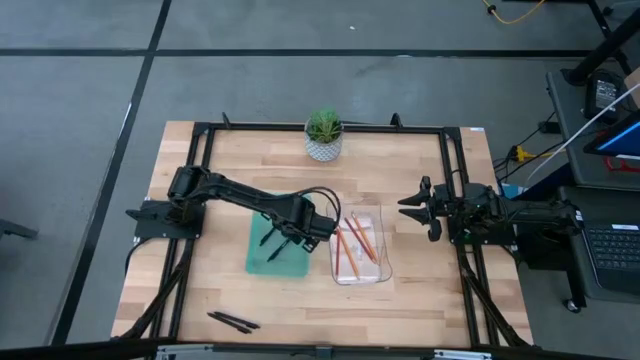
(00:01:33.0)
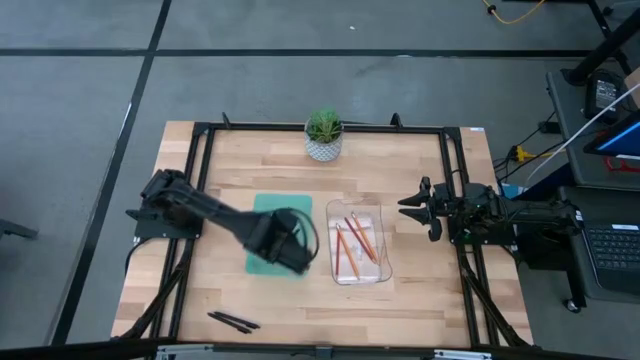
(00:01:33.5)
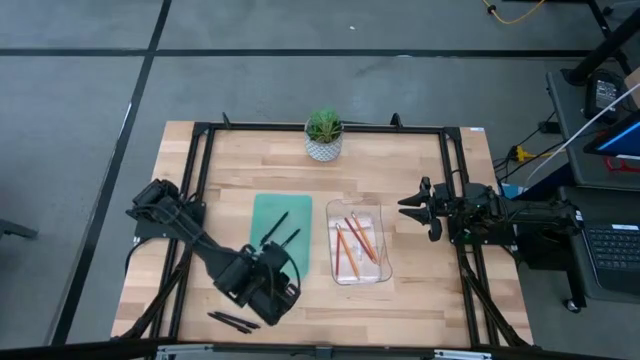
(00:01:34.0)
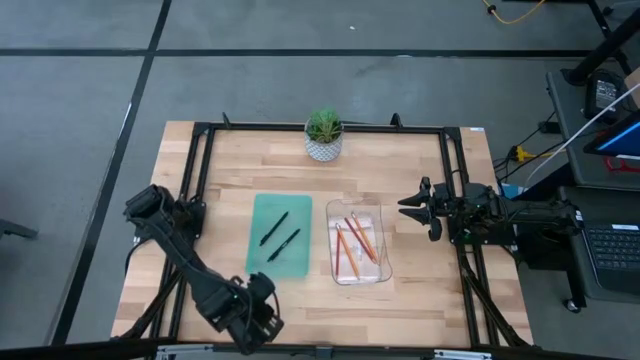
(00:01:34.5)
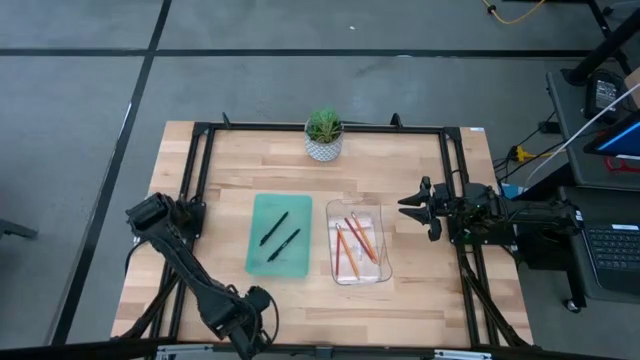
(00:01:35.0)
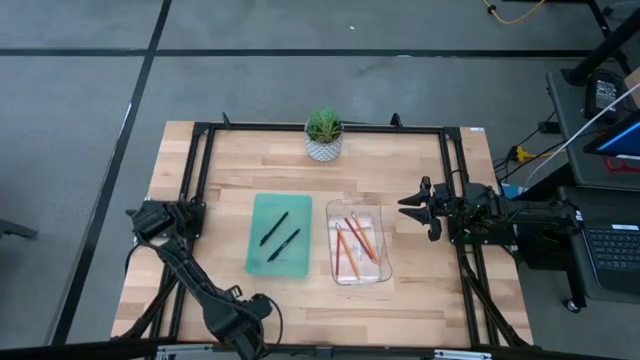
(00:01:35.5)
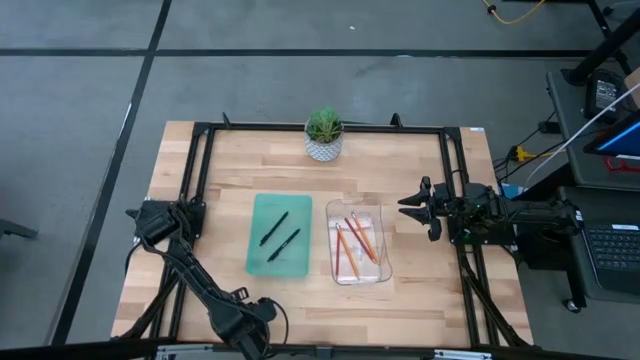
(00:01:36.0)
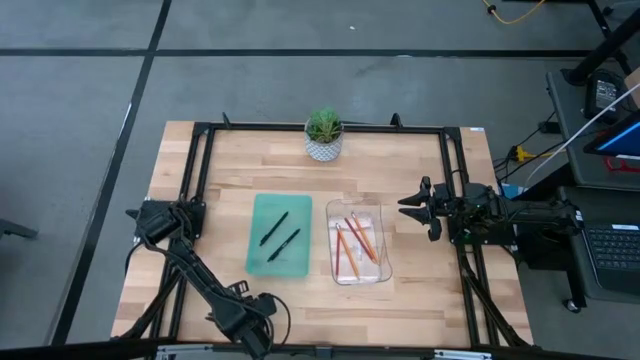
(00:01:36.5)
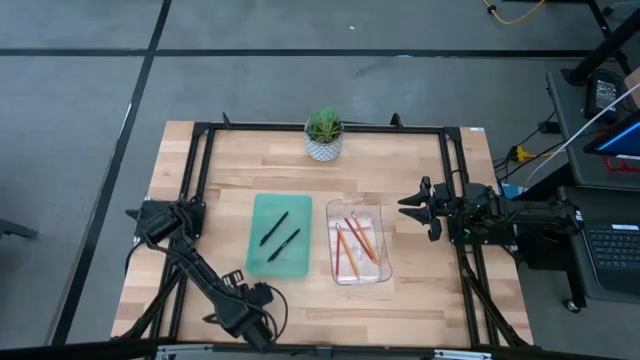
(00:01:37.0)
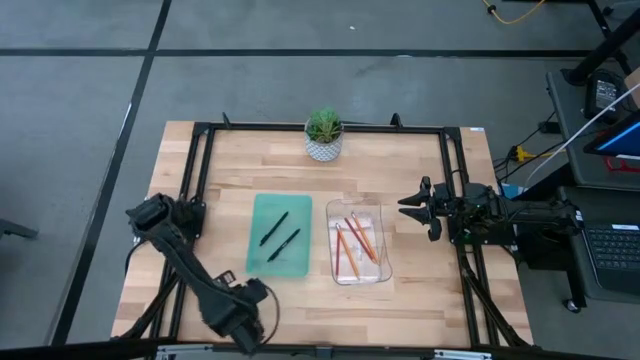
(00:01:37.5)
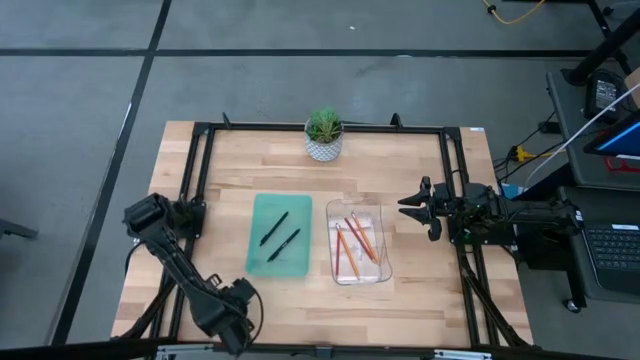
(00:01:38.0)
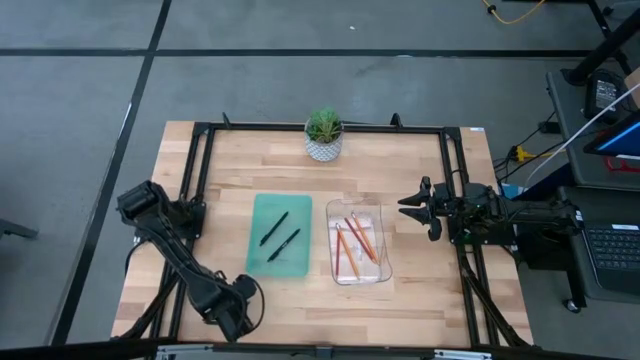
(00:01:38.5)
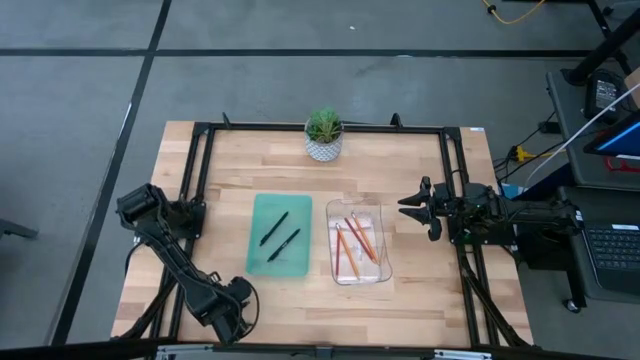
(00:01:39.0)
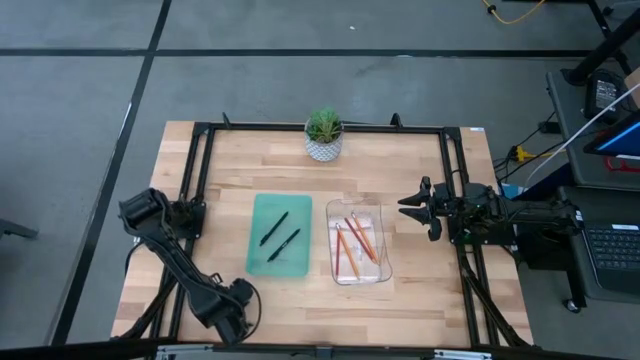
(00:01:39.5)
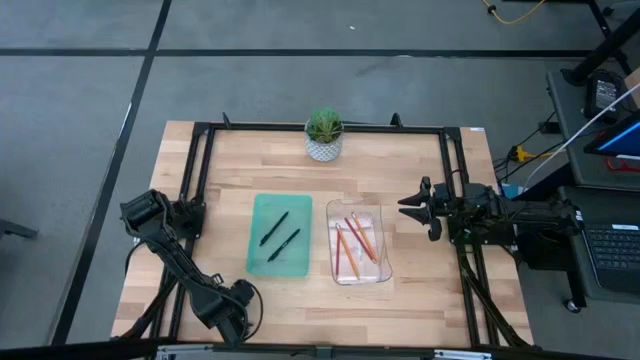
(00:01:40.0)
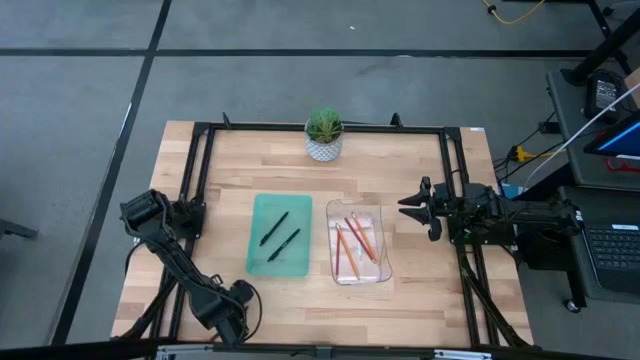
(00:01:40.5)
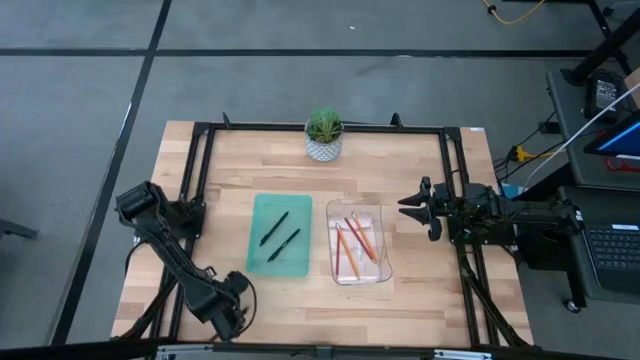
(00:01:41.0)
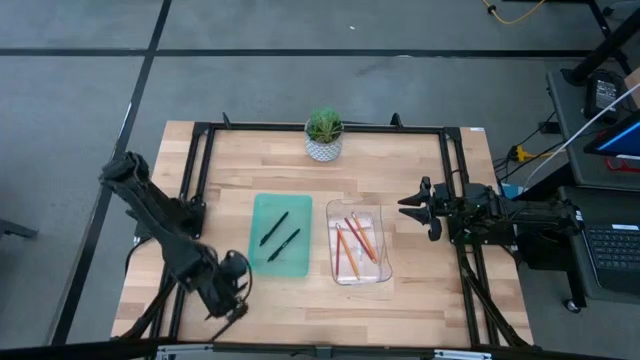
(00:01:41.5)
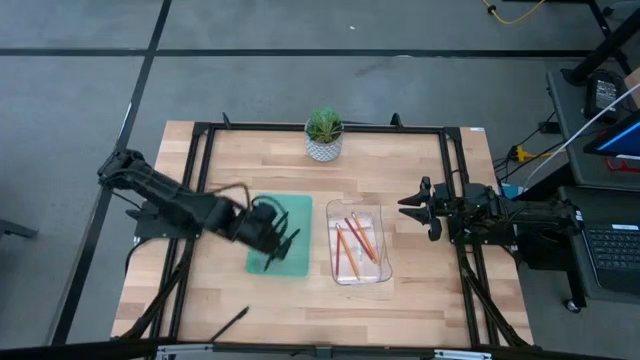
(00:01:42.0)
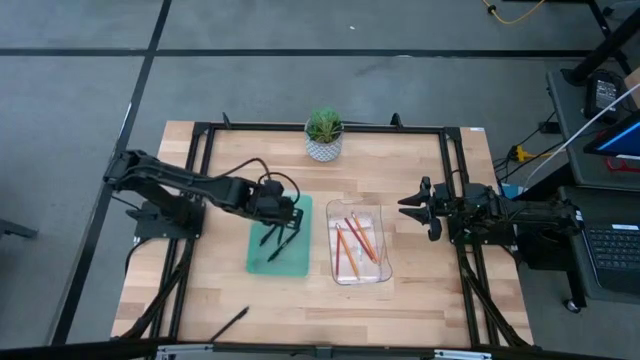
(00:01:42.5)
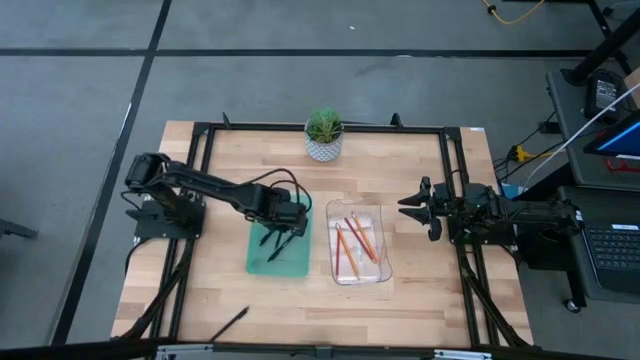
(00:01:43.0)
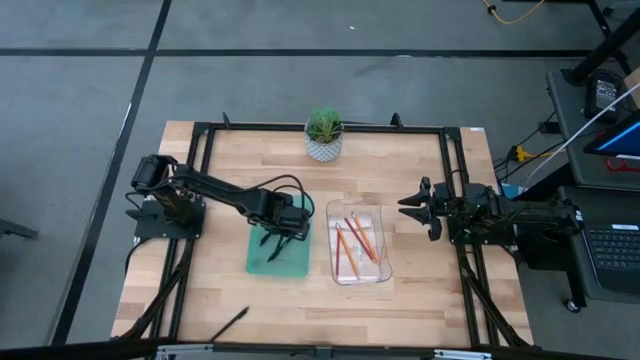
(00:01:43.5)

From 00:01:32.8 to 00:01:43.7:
Task: Sort pens & pencils
Put the black pen into the blue bin

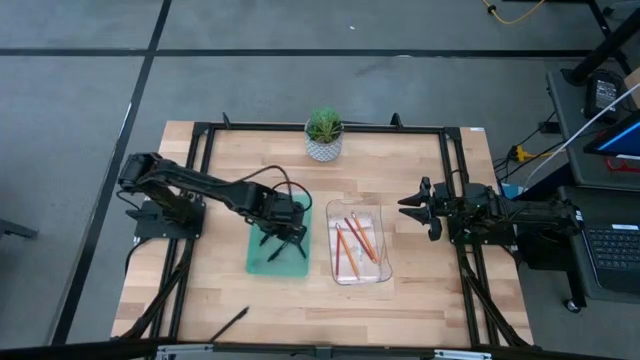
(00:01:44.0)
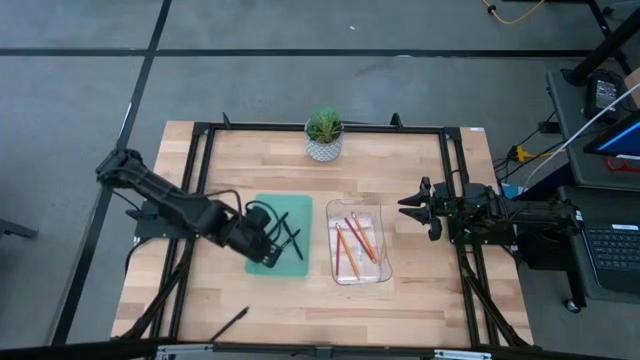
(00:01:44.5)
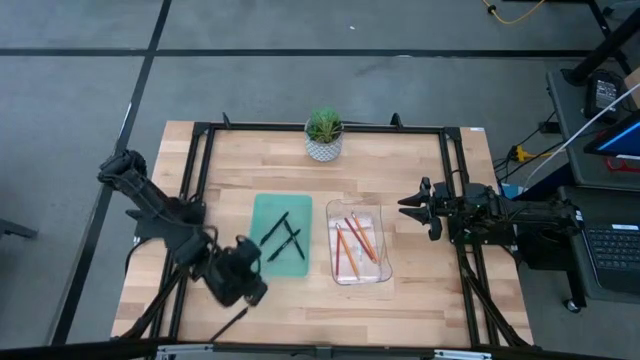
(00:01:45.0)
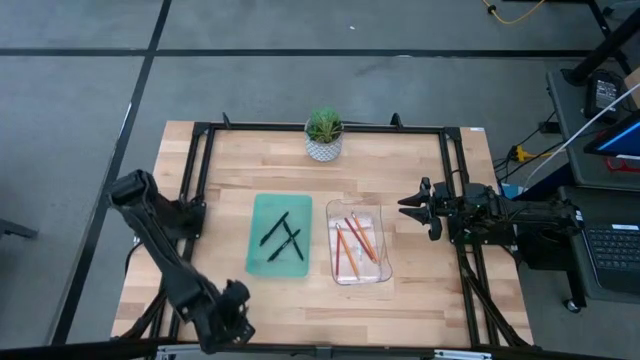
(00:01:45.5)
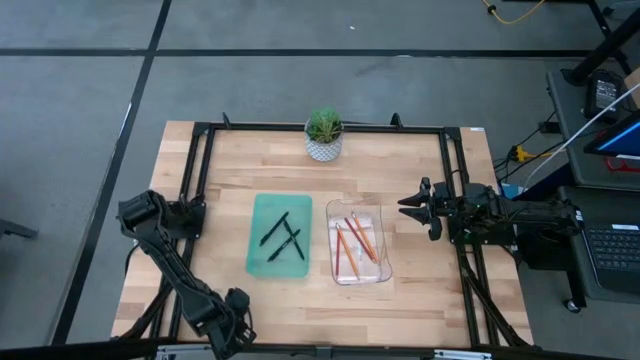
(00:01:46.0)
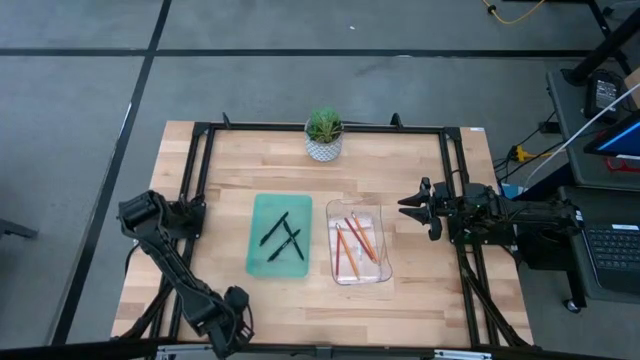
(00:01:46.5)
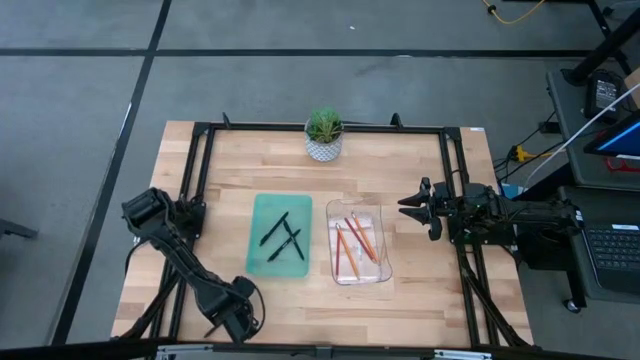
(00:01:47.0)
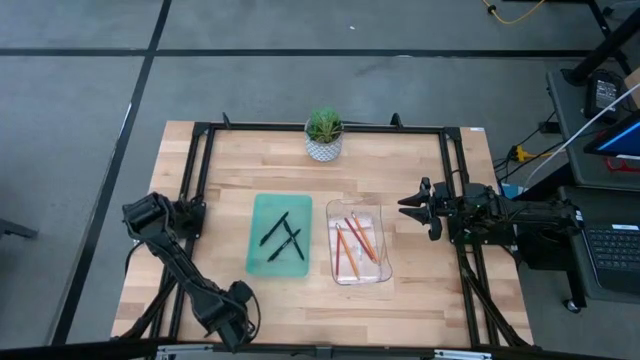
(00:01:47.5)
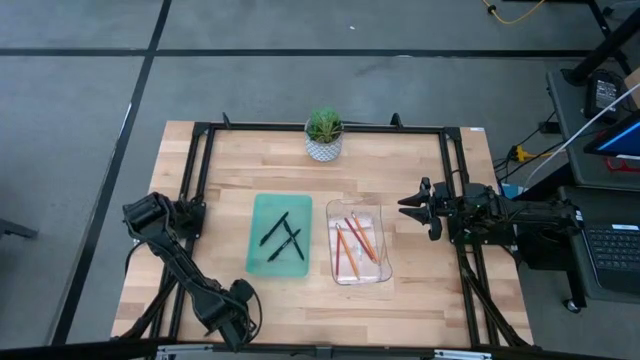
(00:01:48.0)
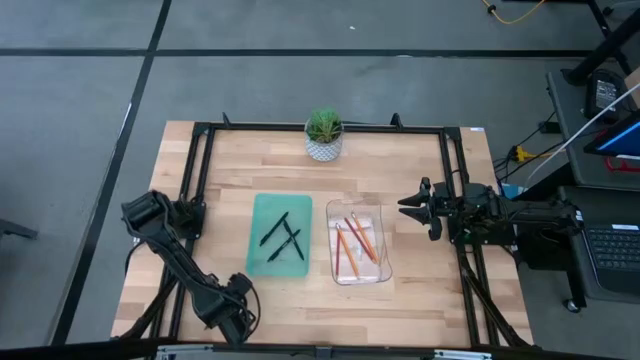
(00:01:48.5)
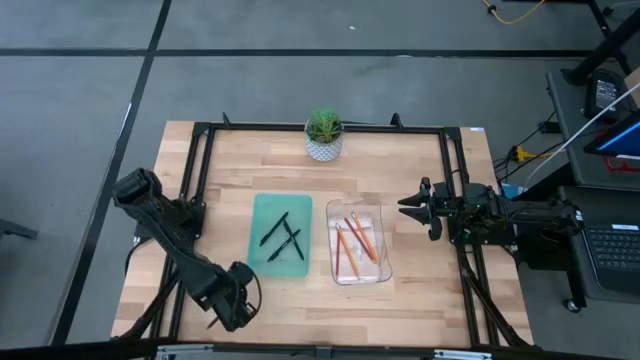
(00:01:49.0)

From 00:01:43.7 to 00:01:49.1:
Put the black pen into the blue bin

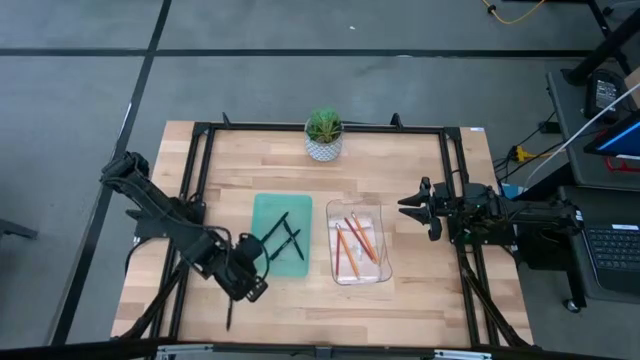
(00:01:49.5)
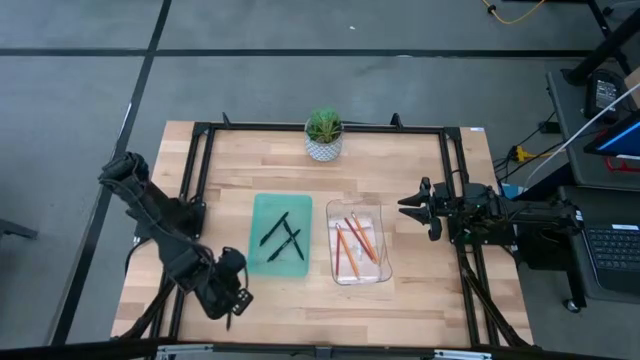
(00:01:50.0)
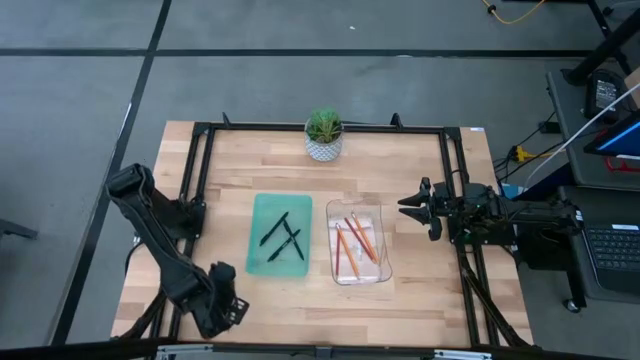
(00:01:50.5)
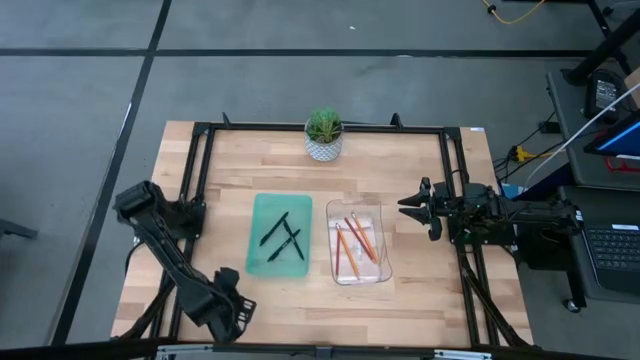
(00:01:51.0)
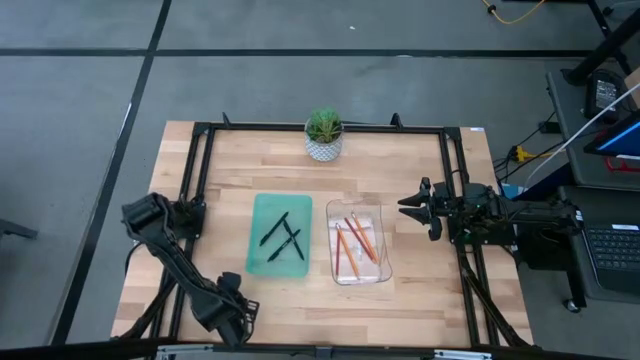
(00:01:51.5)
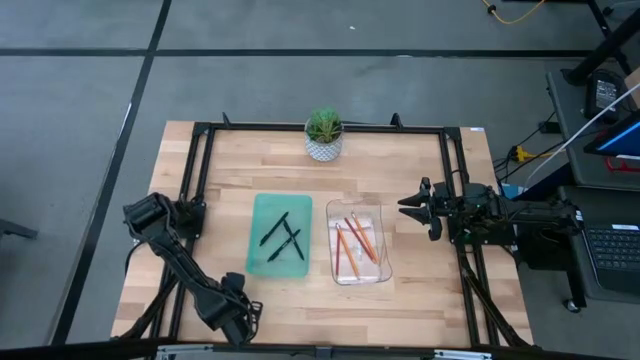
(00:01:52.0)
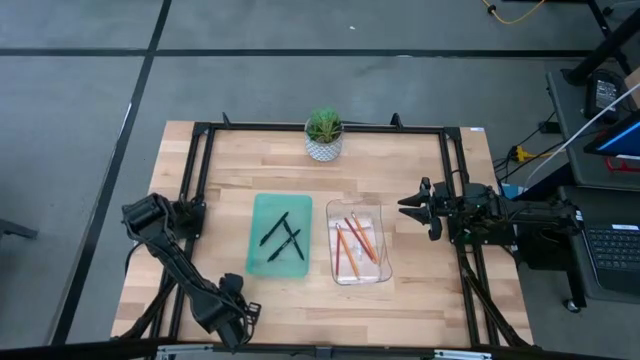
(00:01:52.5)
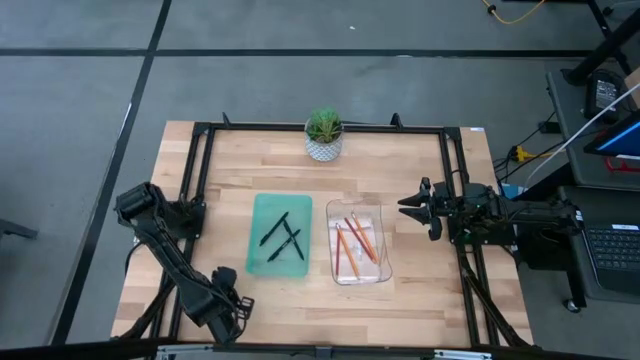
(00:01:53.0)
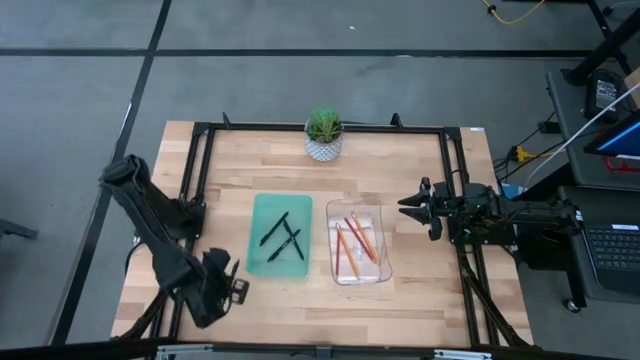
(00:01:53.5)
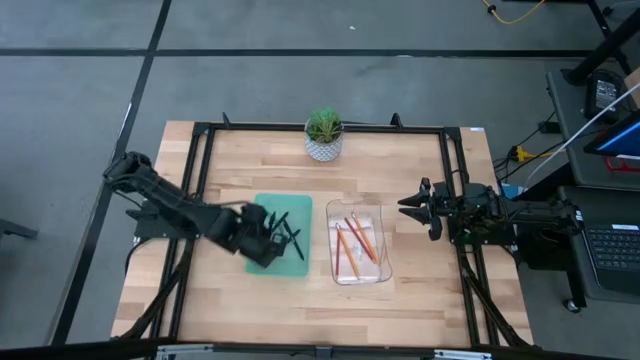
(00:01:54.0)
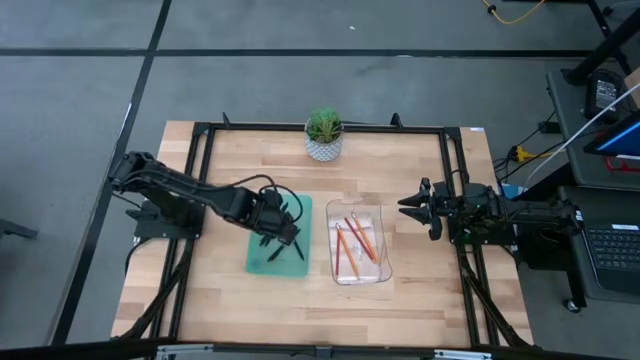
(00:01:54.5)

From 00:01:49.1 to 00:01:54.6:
Put the black pen into the blue bin
